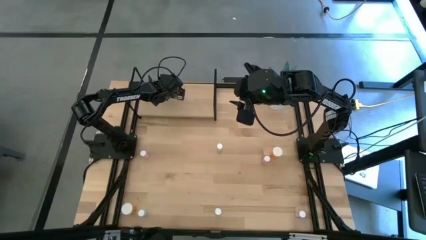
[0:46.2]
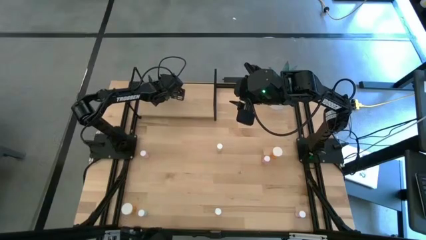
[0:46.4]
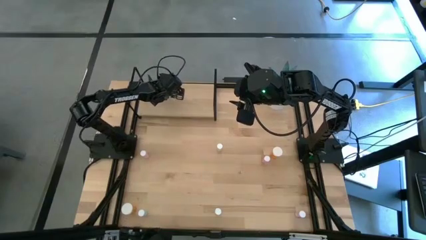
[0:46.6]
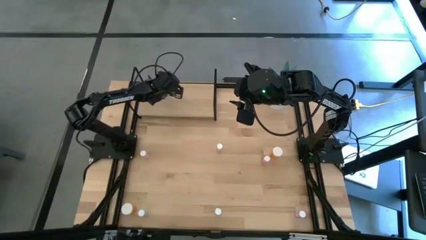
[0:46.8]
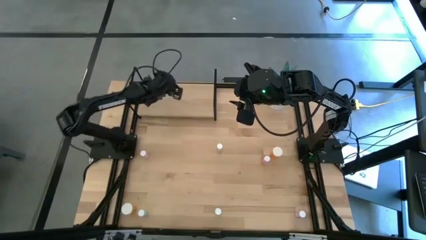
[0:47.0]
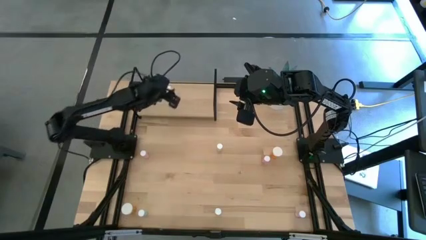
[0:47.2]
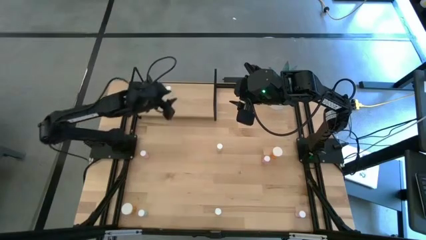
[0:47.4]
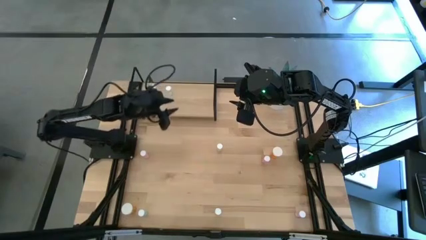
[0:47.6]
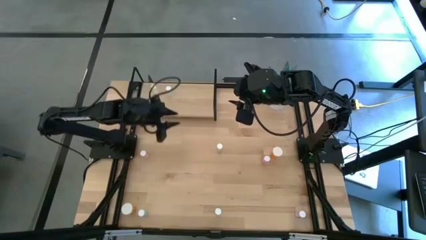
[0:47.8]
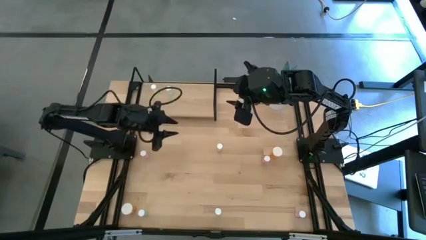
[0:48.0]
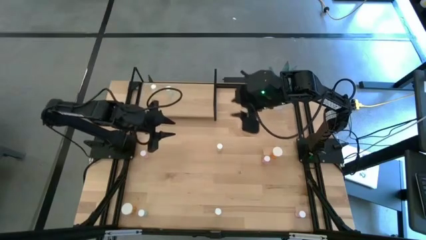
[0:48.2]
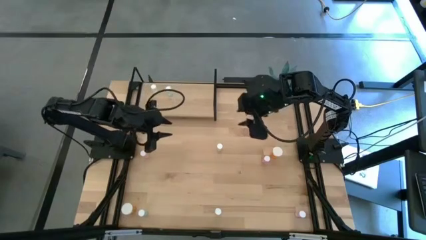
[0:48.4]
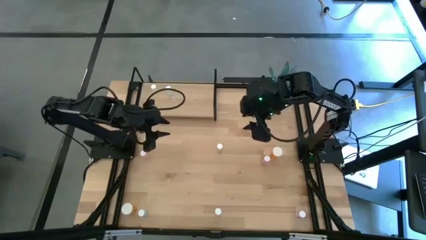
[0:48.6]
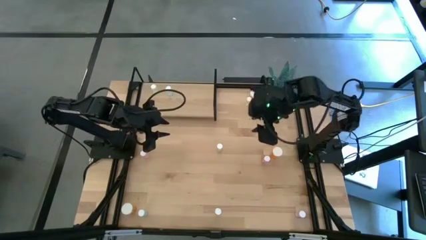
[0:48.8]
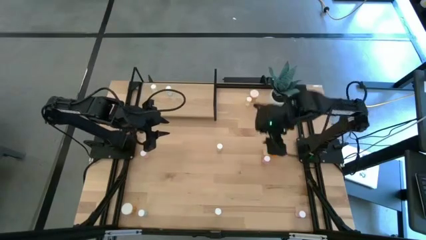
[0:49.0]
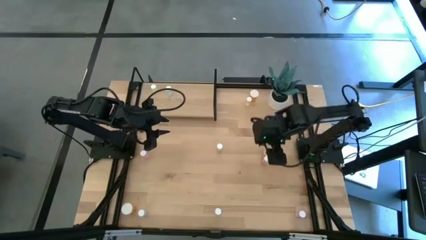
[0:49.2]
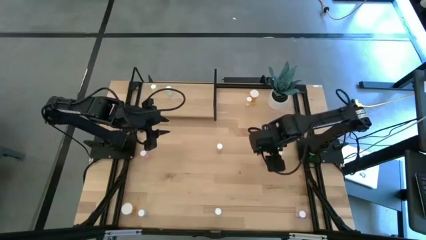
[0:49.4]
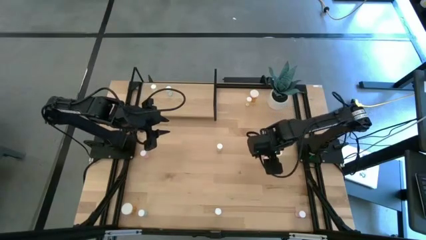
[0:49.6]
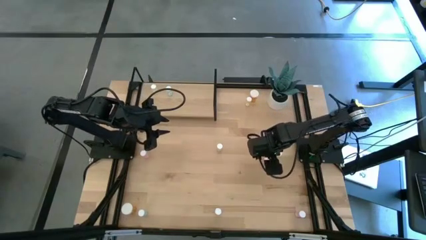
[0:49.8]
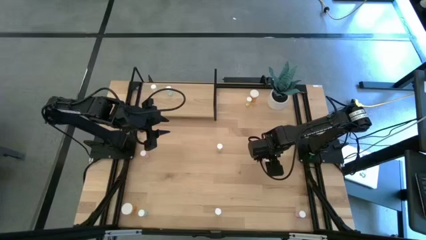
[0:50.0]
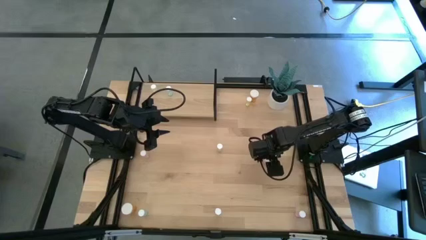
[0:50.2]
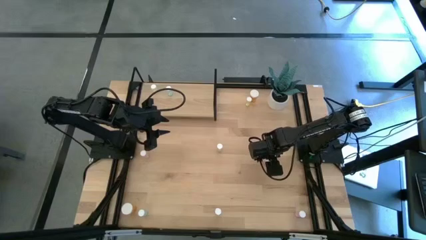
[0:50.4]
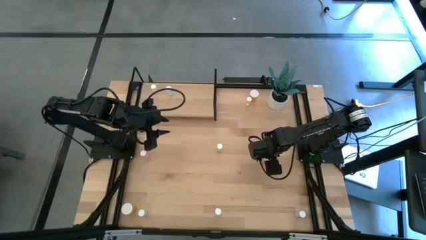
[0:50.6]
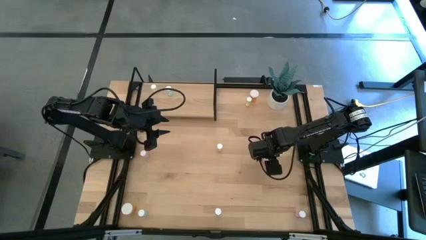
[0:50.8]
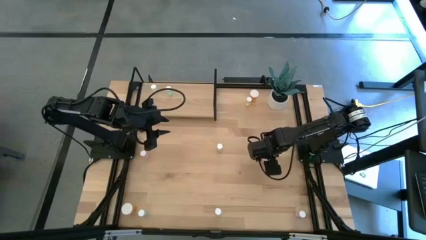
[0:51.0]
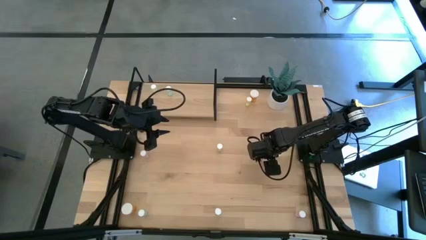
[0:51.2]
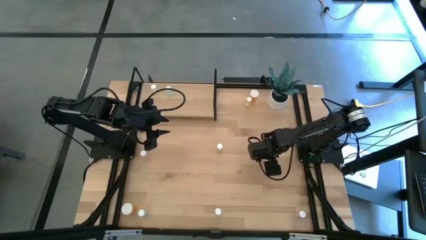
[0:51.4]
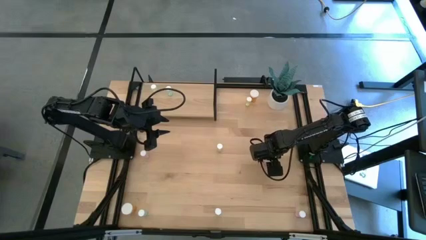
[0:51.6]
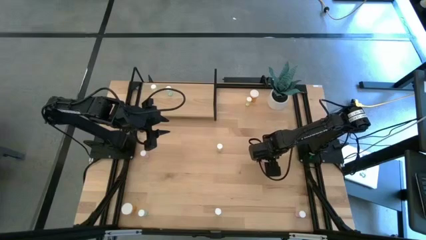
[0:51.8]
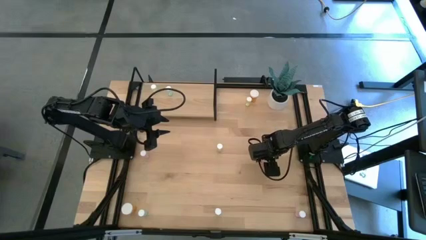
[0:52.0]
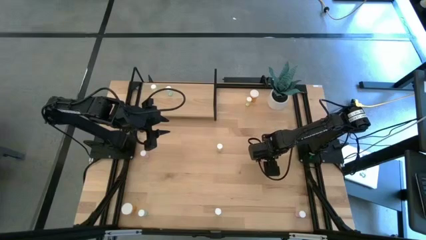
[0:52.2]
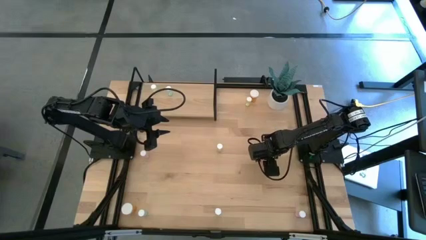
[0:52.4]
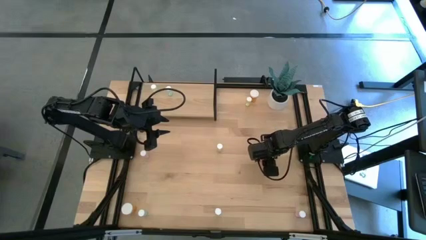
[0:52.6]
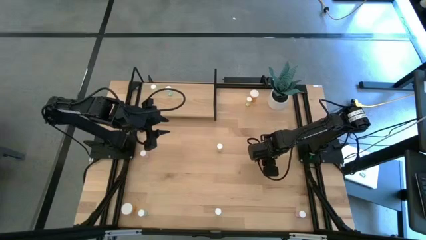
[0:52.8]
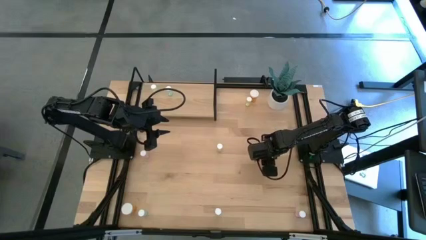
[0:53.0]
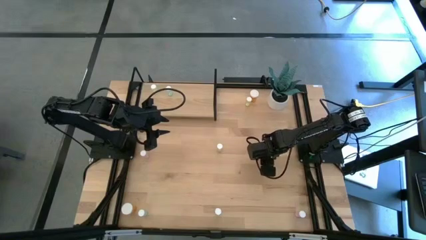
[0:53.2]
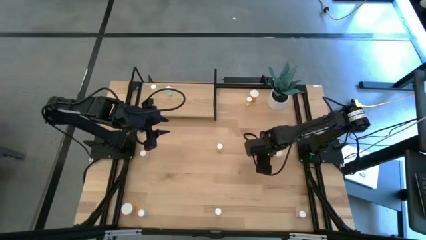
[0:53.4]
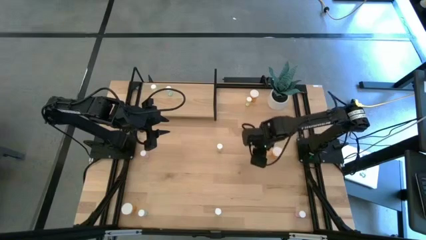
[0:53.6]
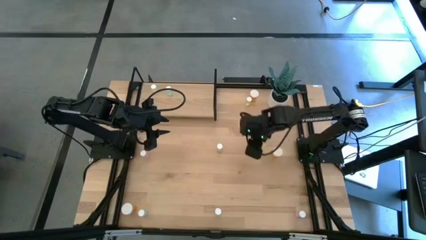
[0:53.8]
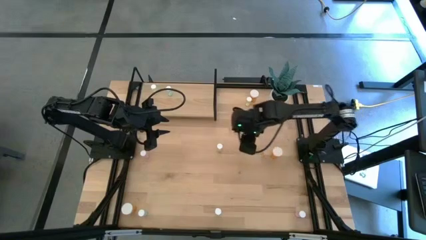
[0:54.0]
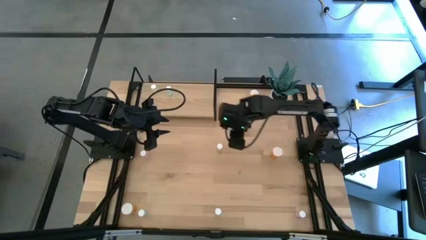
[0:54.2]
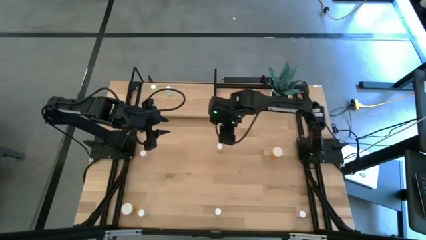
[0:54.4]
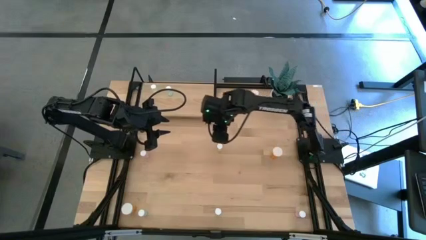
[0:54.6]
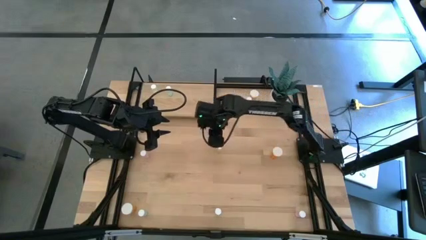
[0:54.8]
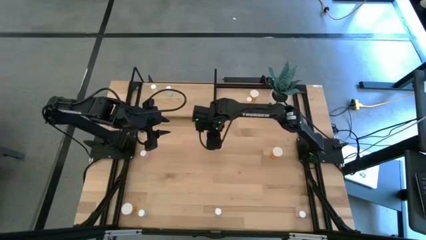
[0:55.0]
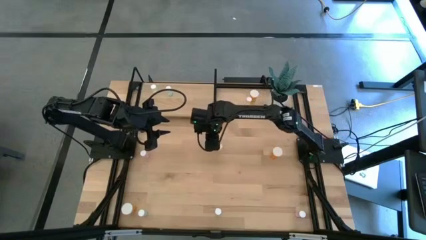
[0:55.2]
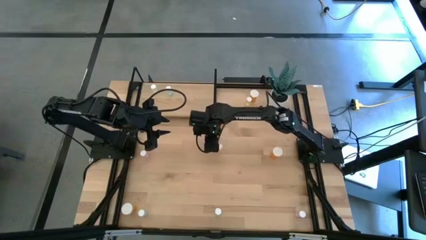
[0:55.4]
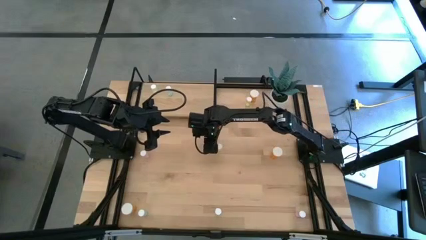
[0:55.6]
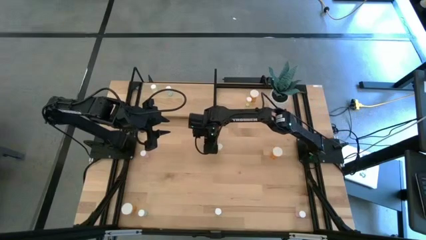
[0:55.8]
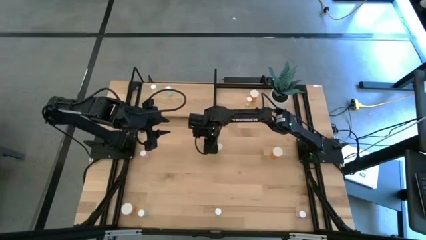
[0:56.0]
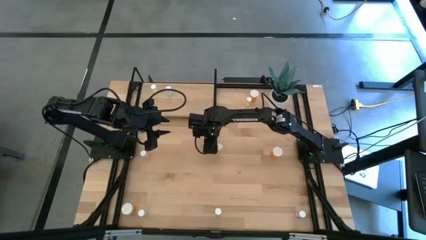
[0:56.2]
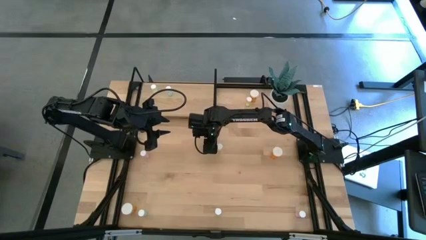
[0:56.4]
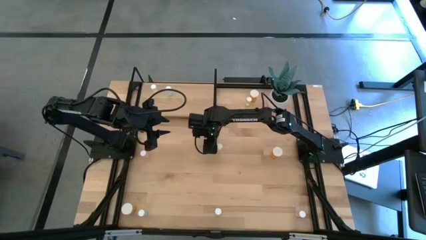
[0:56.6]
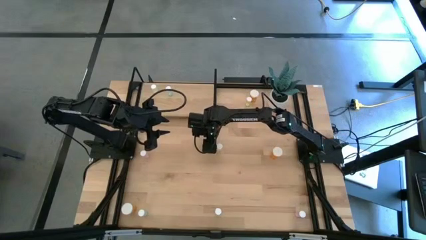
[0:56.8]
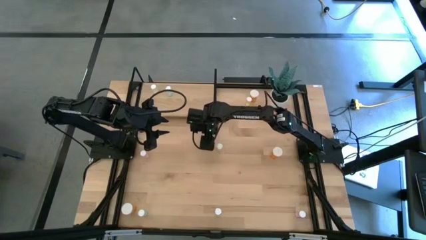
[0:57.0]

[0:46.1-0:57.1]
Task: Pick and place medicine bottles onto shelf by color
Put the top right pink pill bottle on the shelf

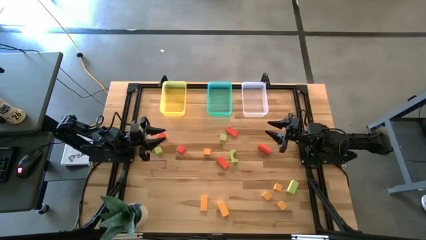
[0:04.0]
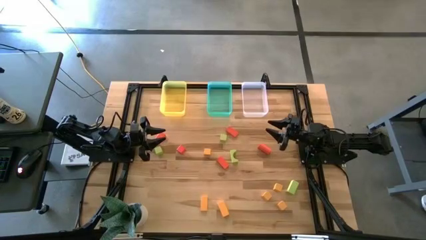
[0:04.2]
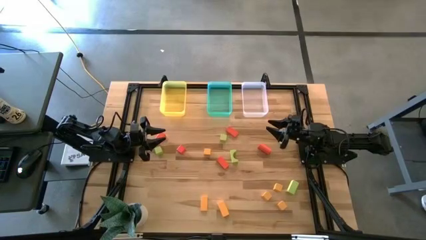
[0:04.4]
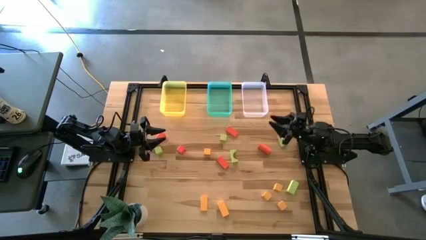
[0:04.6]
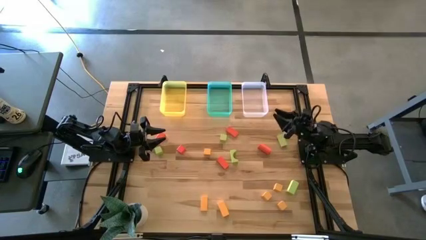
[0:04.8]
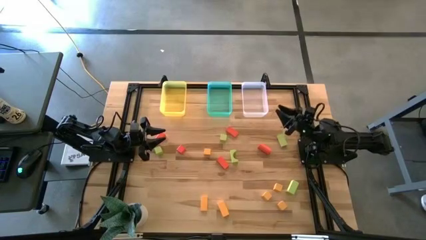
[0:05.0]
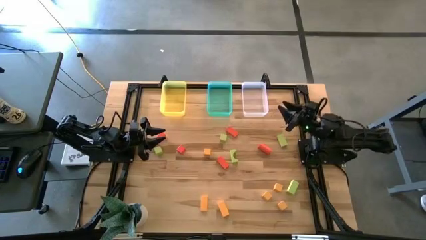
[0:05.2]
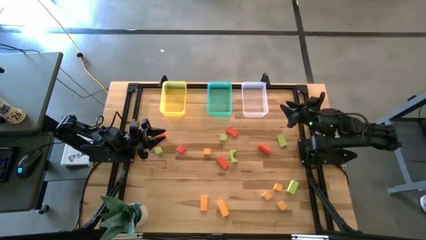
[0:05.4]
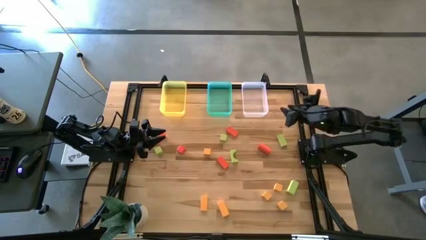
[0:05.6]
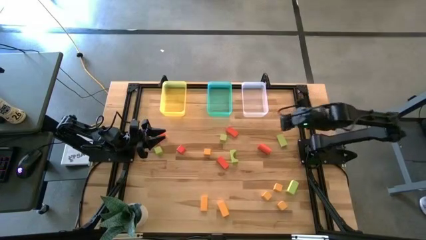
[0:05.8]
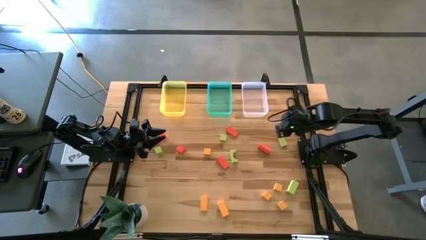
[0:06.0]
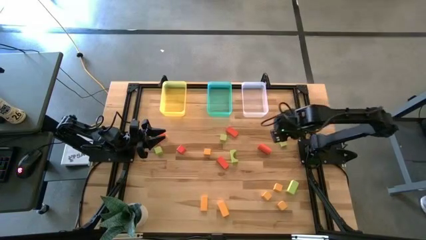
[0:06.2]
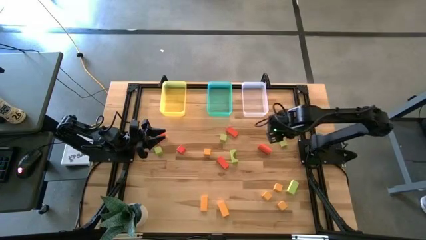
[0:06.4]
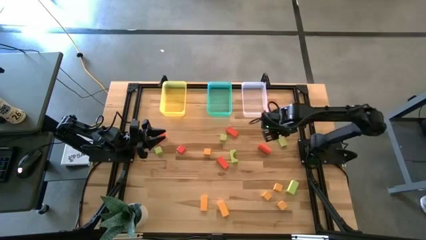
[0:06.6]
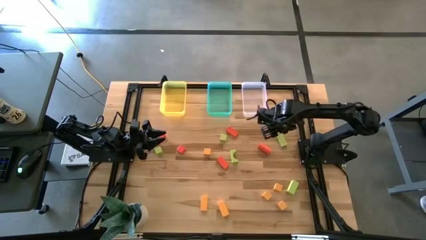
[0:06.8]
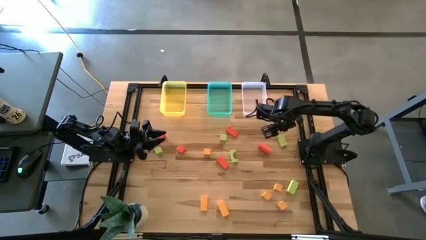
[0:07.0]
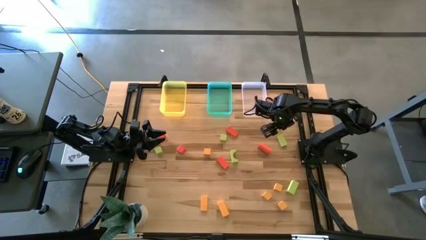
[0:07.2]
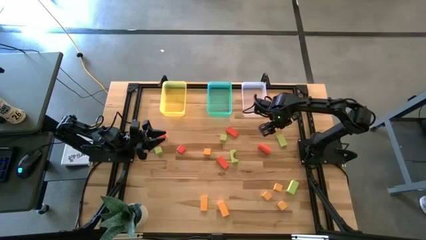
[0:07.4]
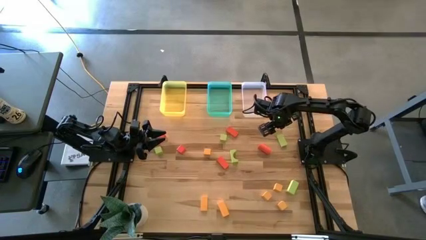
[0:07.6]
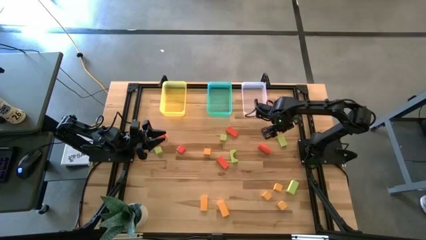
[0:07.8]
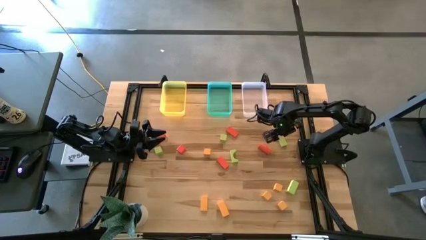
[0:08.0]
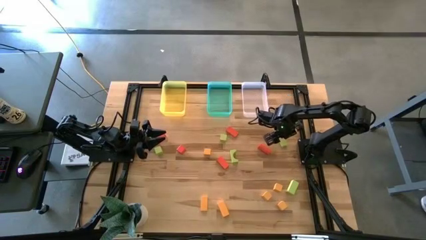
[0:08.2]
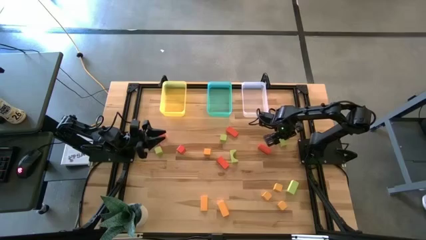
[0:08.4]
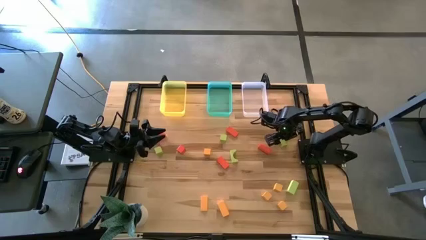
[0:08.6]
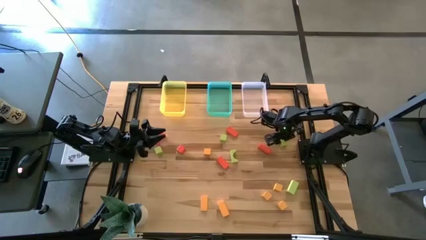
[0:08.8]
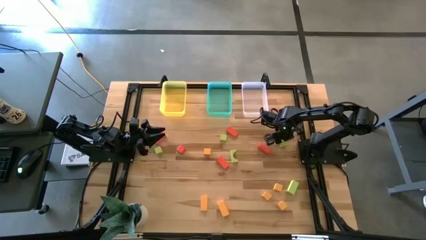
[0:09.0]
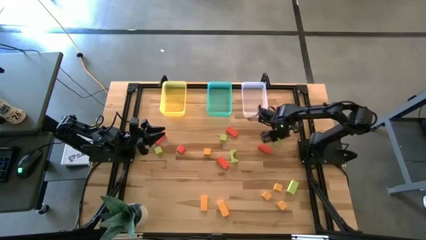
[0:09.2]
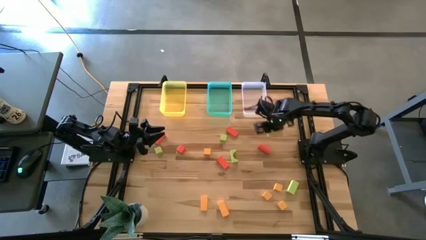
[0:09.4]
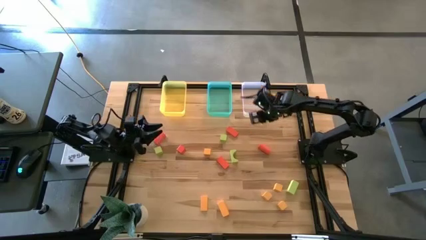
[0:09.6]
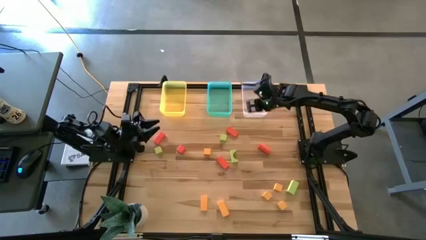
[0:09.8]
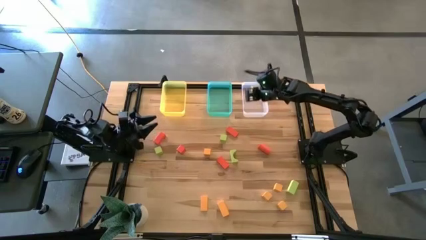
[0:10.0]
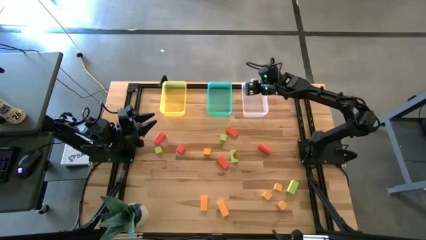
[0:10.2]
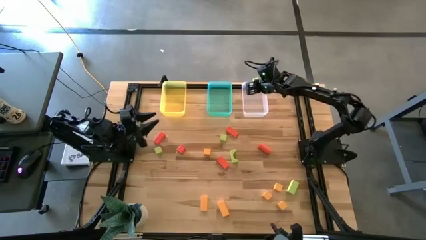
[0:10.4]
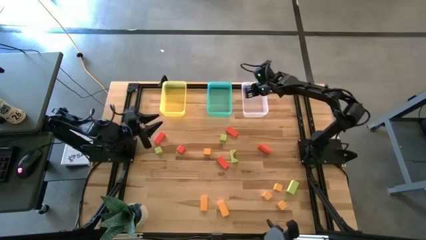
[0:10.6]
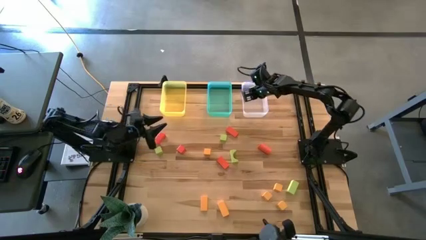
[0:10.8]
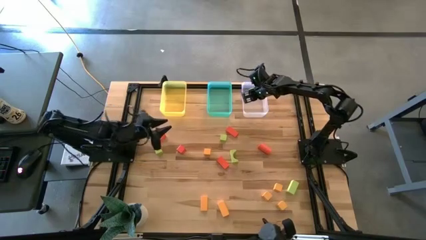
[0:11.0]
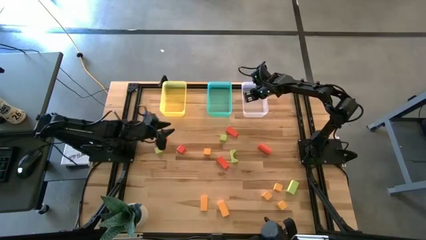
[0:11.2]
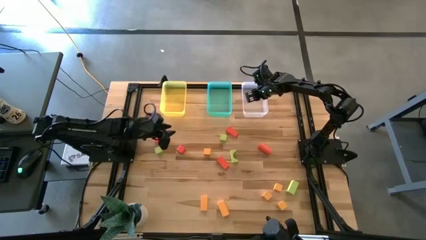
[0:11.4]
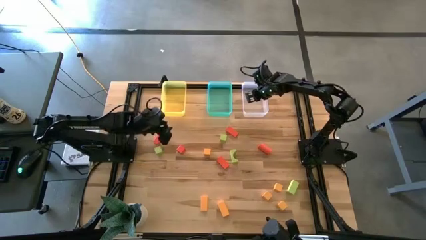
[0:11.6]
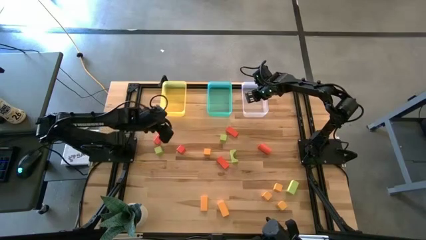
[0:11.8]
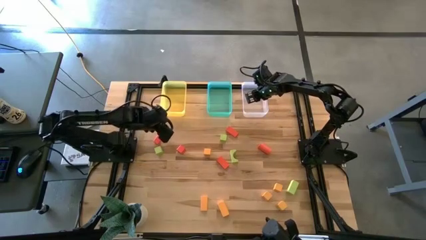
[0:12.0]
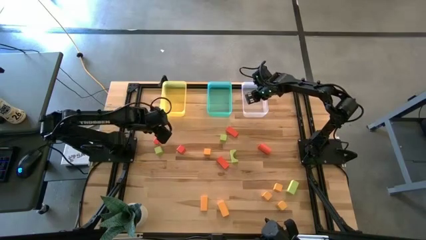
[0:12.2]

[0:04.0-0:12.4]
Task: Sort & place blocks by color
Put the green block into the transparent bin
